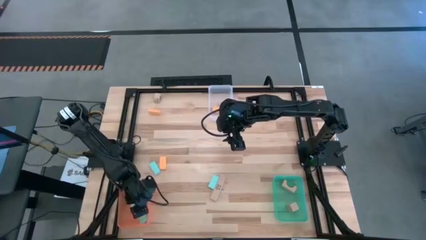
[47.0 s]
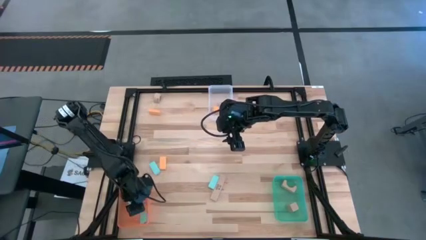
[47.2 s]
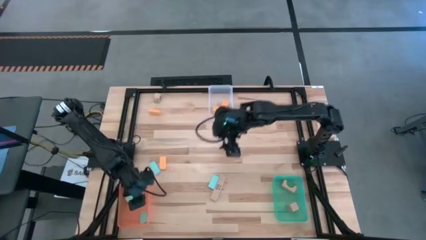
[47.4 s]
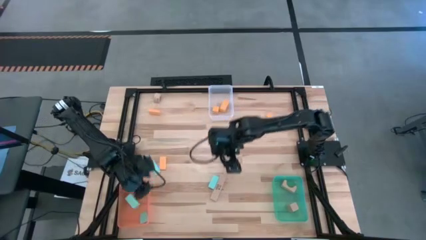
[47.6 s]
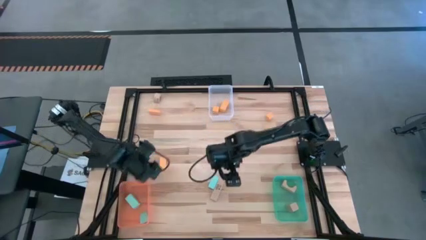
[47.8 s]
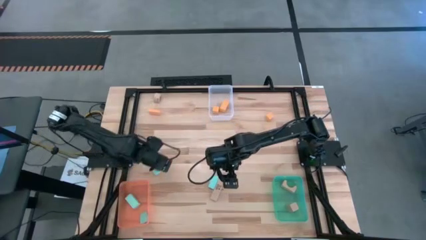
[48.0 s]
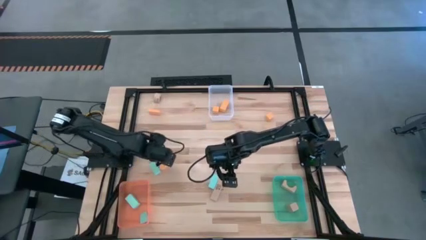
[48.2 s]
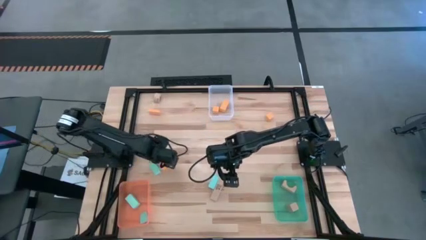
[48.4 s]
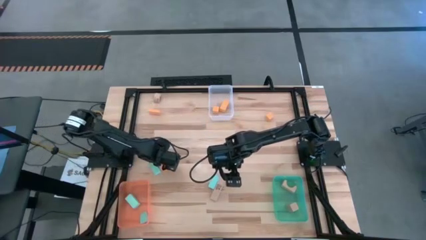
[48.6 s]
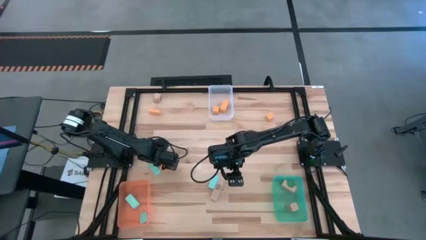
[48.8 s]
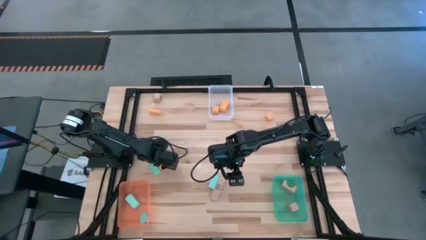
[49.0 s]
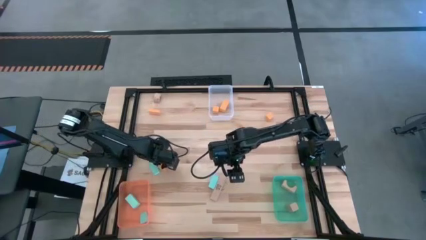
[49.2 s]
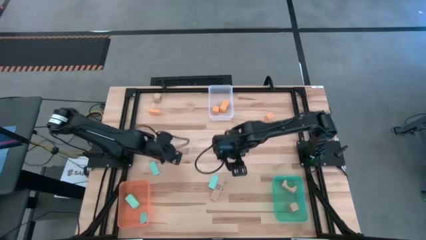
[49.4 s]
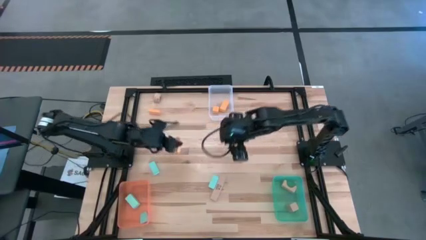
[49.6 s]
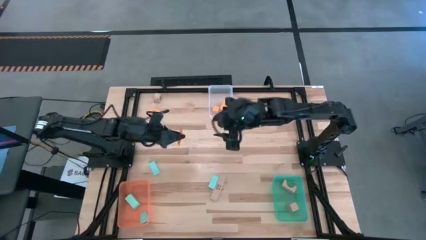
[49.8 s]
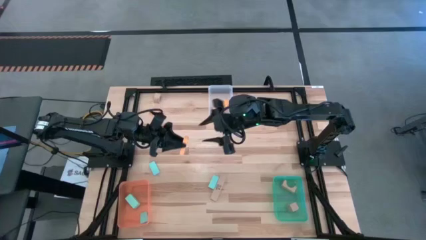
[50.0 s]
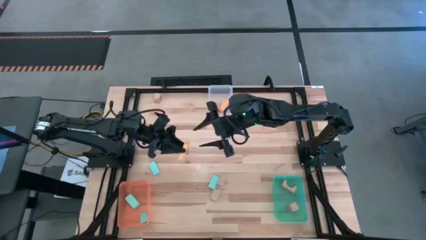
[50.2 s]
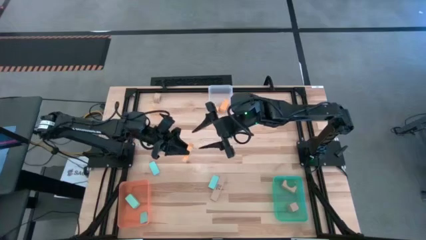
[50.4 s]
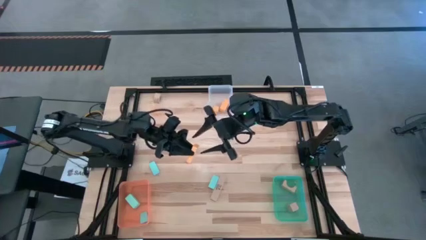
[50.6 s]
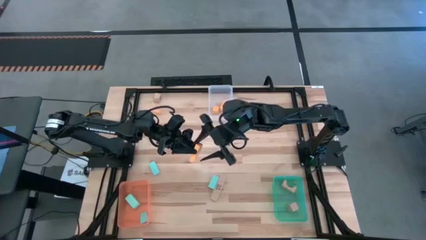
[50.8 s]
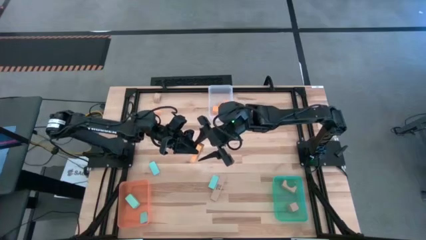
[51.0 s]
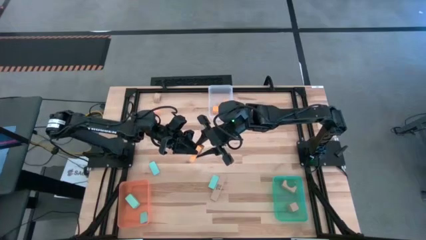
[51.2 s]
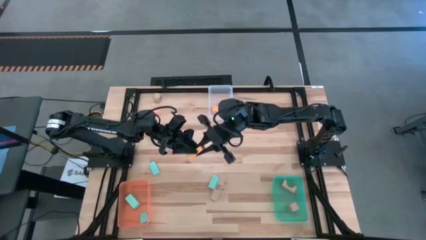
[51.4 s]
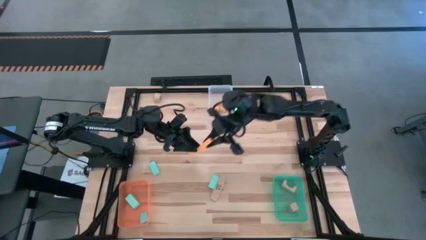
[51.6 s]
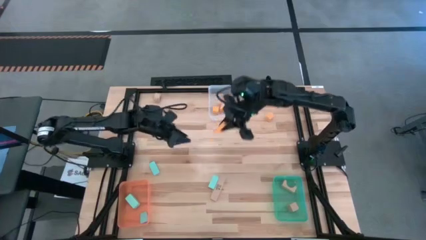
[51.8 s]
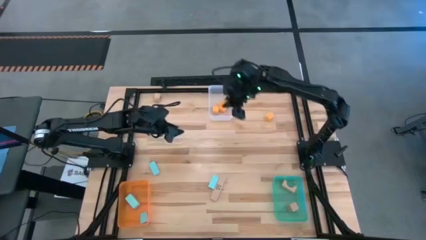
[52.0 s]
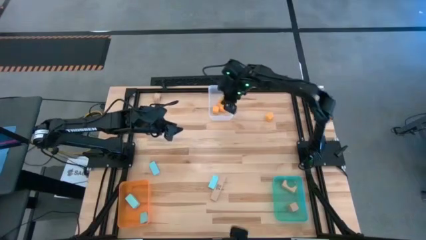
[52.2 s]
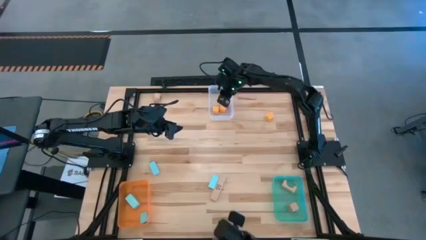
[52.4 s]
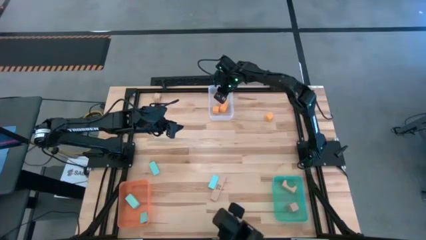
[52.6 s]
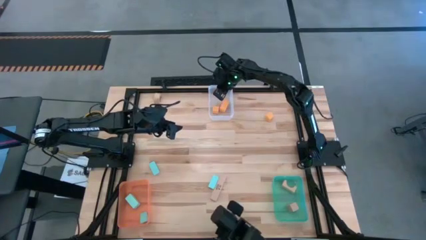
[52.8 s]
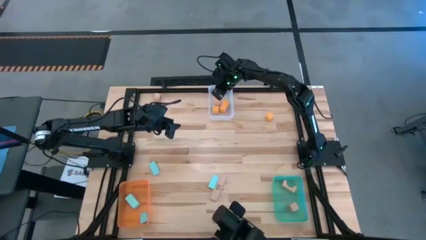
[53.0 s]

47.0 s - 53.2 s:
Task: Sort & place blocks by color
Put the orange block into the transparent white bin

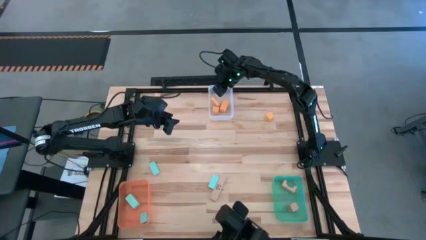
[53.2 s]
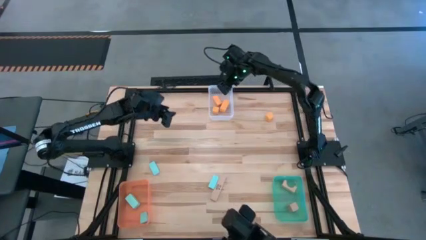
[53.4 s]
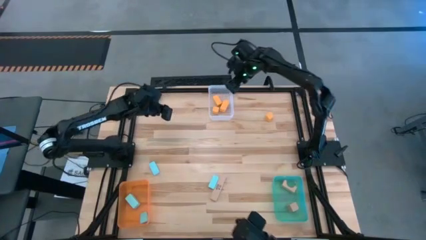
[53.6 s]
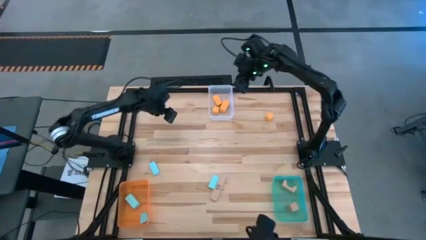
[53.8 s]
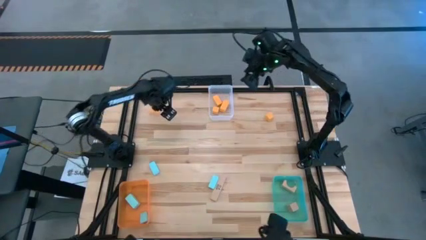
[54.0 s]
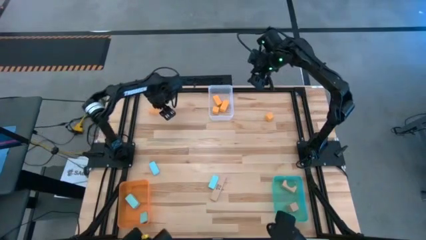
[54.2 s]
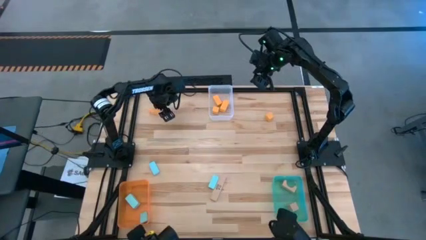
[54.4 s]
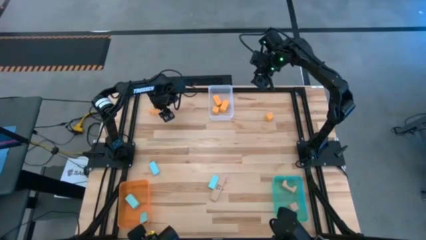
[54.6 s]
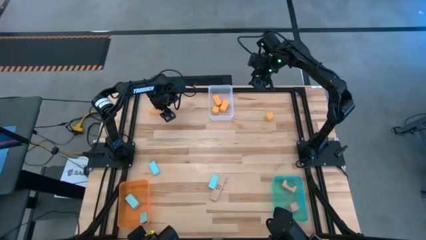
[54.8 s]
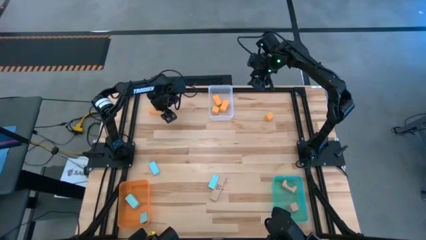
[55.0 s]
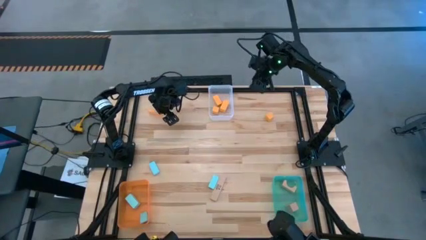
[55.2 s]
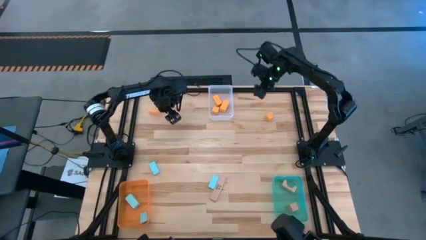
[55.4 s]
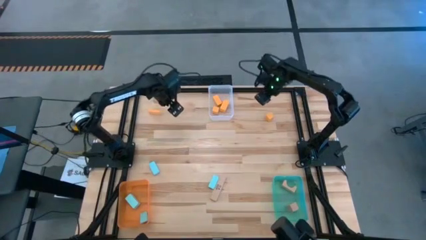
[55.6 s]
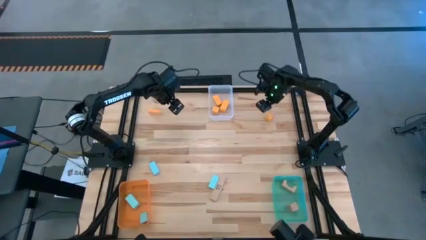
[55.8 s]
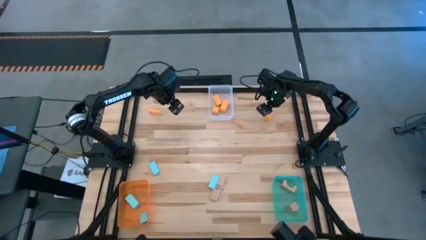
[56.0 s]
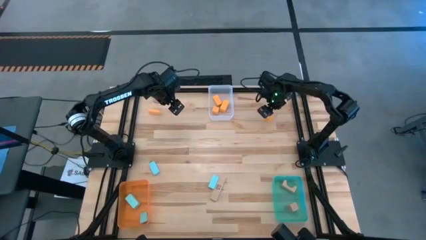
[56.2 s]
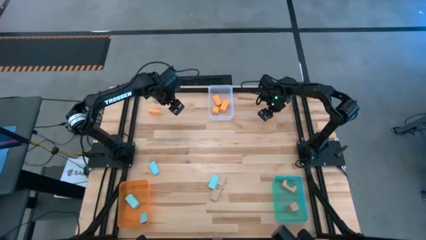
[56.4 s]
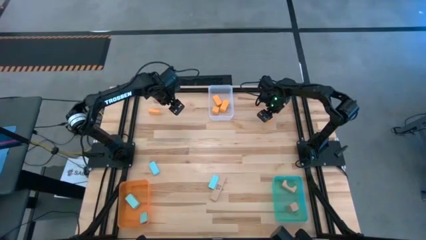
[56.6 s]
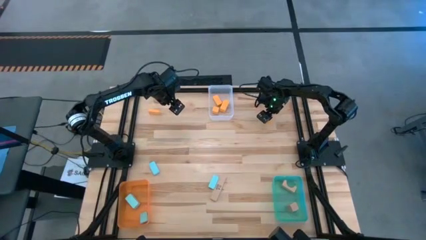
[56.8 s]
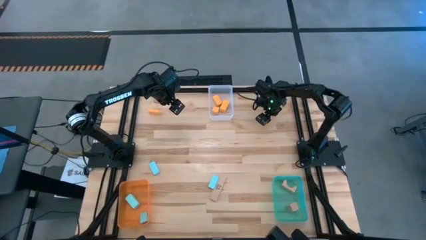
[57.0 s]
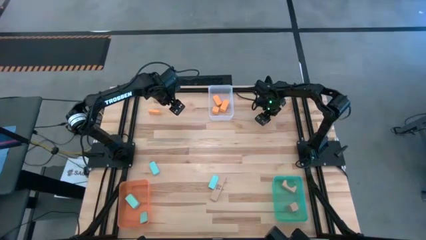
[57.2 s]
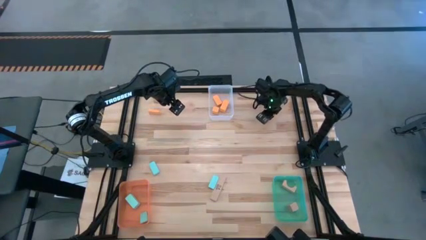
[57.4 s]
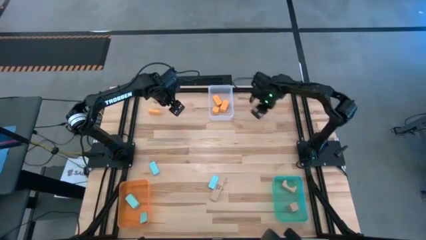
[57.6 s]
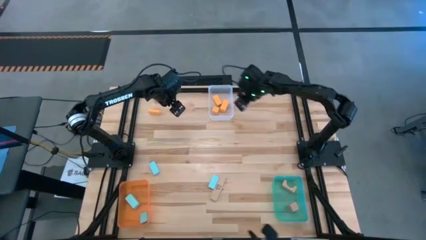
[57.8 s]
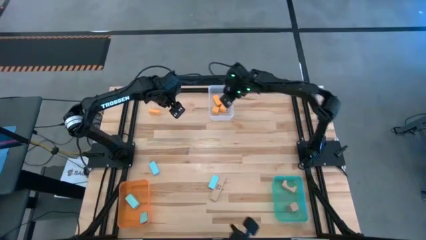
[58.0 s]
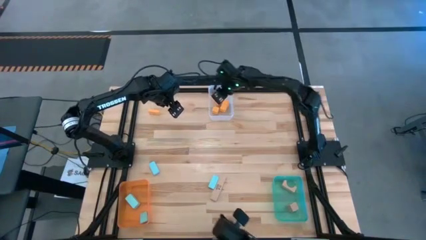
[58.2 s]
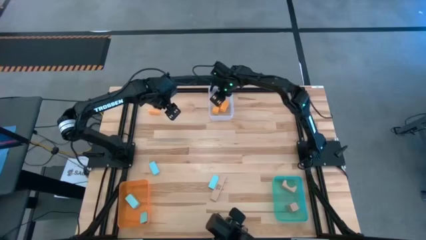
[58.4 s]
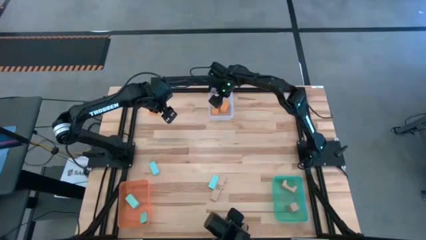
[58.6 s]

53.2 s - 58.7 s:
Put the orange block into the transparent white bin

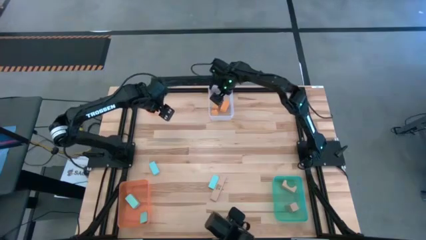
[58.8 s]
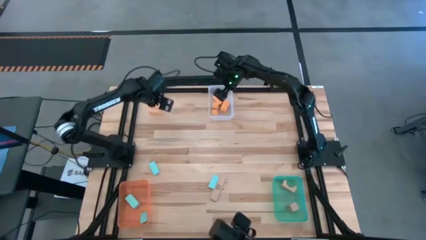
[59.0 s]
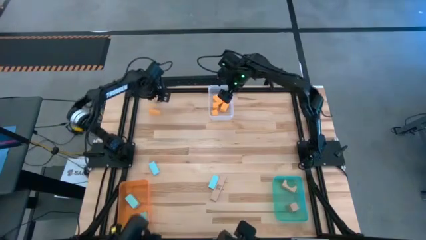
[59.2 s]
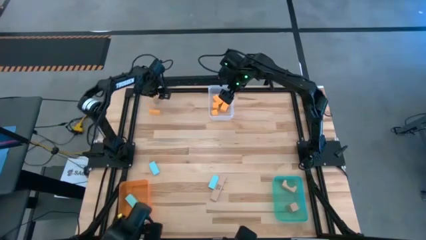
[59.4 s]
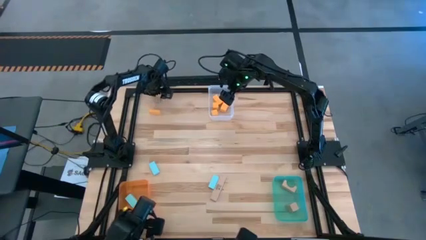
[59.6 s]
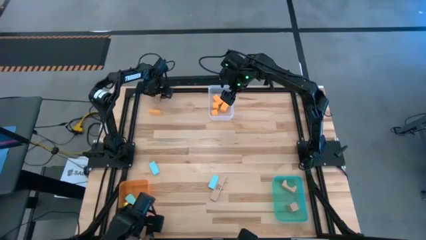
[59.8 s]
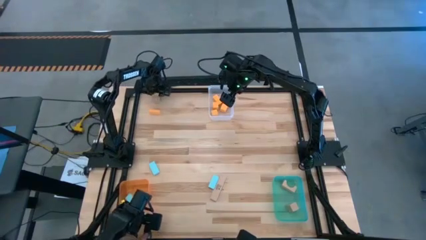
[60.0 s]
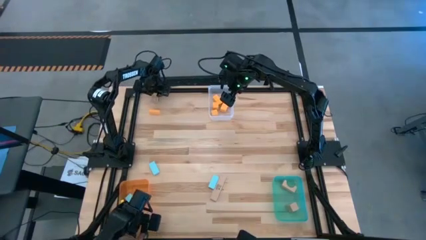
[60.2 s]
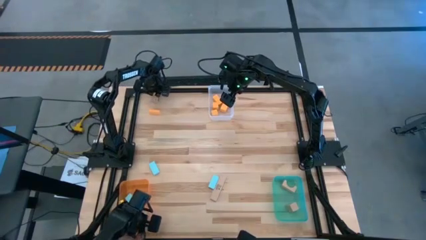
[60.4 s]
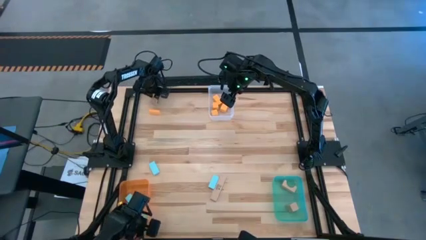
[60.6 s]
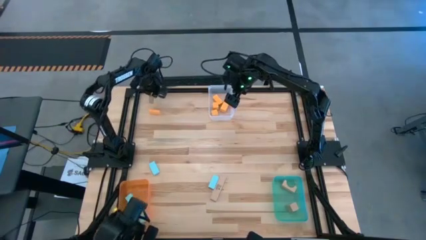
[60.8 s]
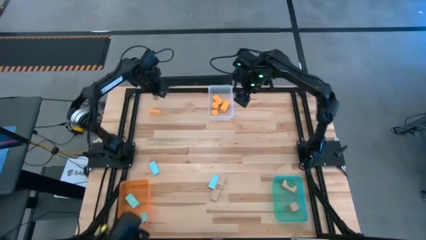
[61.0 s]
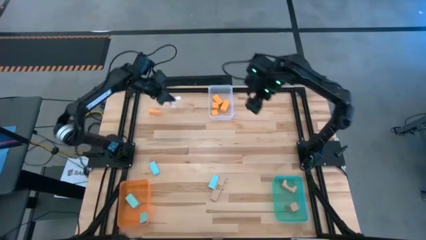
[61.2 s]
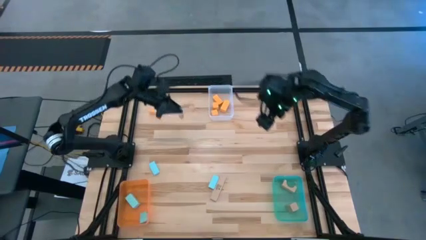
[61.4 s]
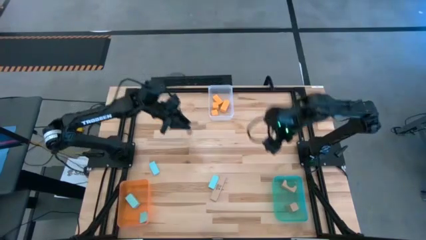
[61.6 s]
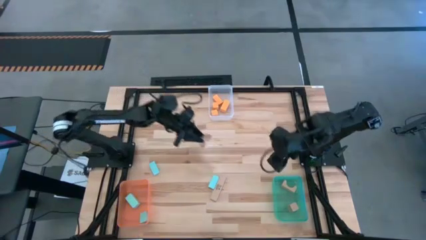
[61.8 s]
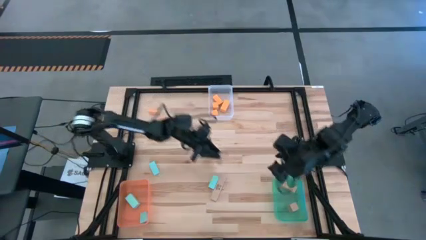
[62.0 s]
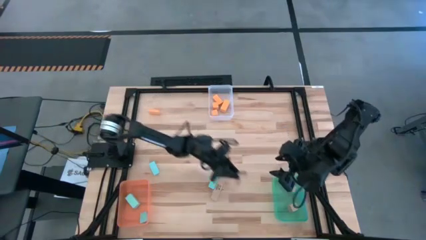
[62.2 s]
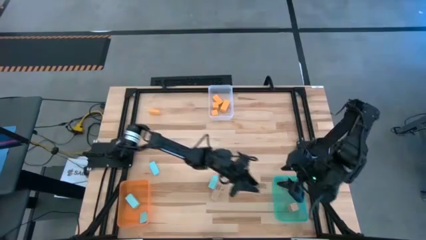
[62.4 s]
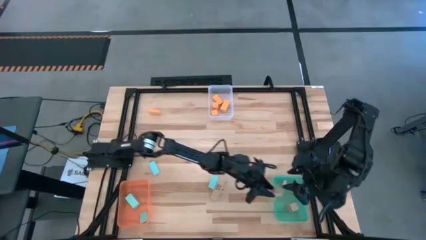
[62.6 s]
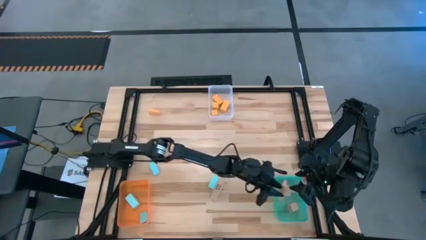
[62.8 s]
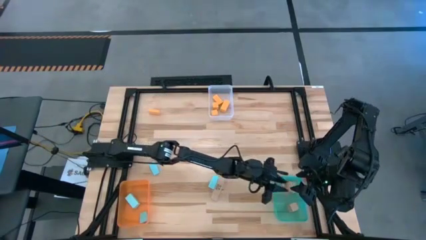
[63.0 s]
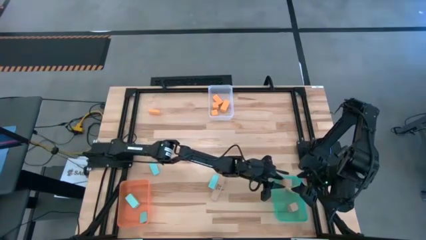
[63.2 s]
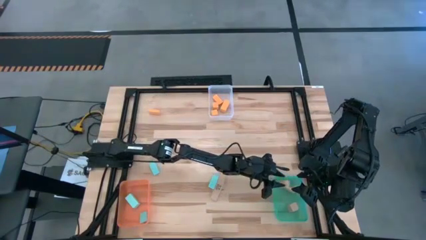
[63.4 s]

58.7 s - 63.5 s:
Put the light brown block into the transparent blue bin
